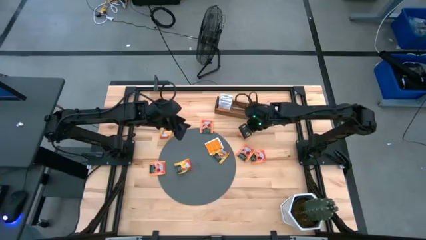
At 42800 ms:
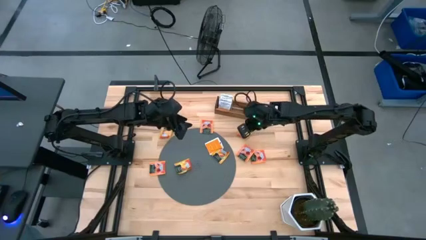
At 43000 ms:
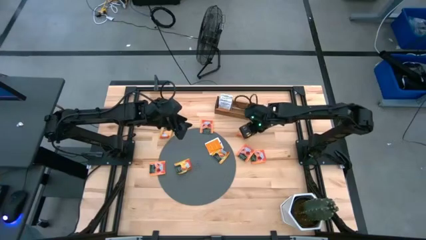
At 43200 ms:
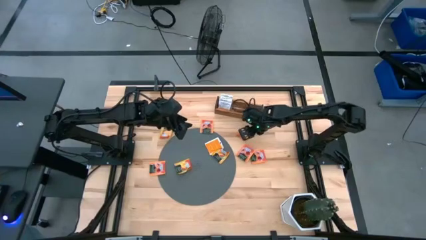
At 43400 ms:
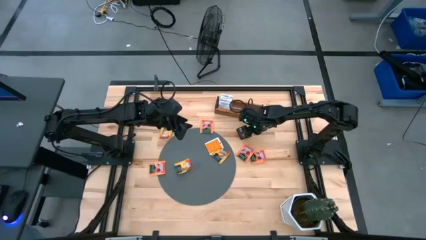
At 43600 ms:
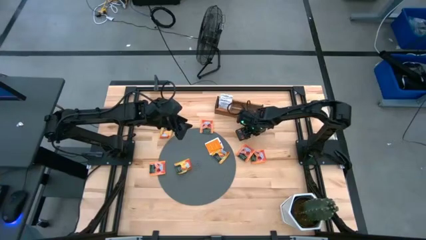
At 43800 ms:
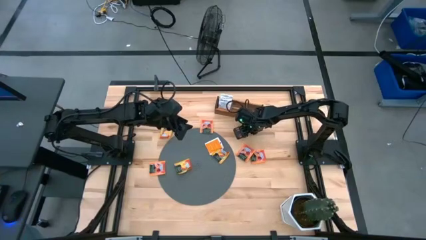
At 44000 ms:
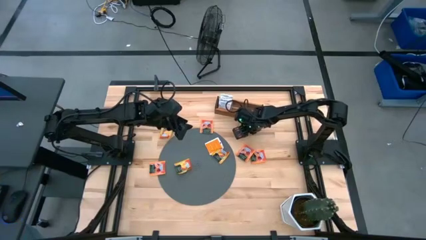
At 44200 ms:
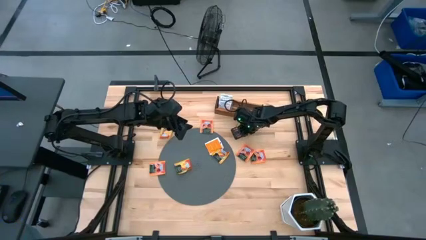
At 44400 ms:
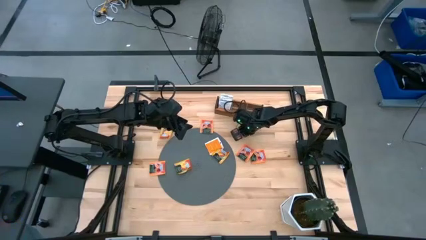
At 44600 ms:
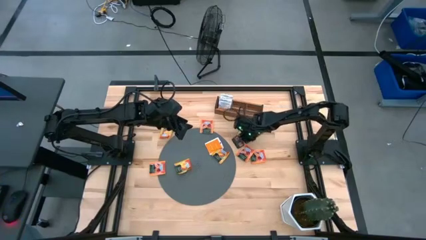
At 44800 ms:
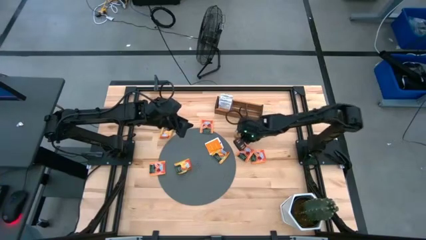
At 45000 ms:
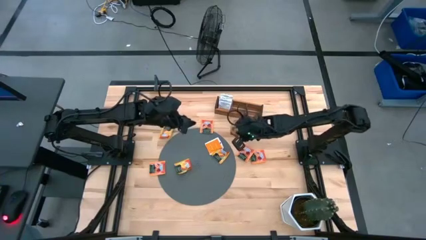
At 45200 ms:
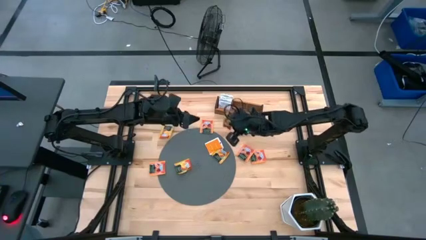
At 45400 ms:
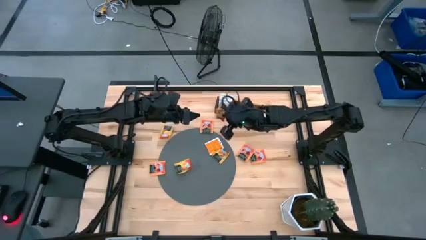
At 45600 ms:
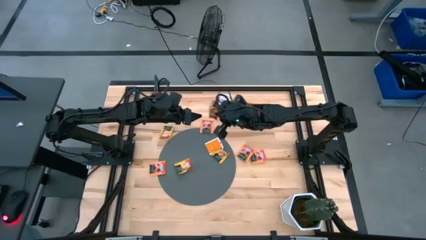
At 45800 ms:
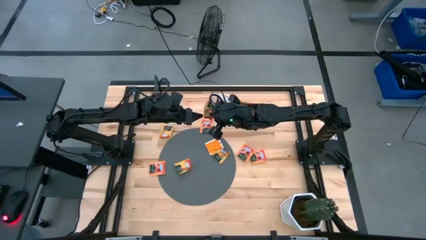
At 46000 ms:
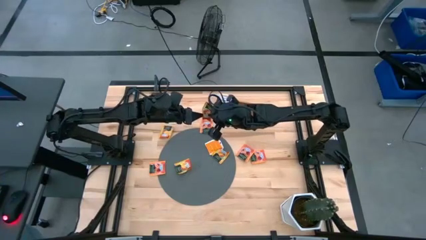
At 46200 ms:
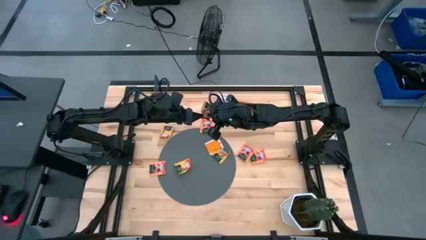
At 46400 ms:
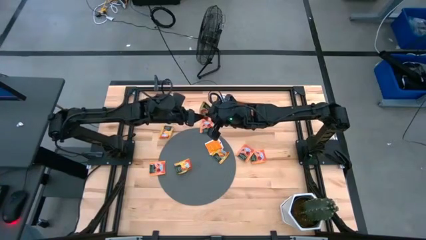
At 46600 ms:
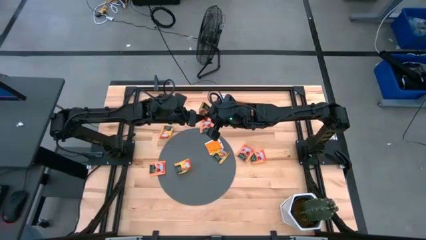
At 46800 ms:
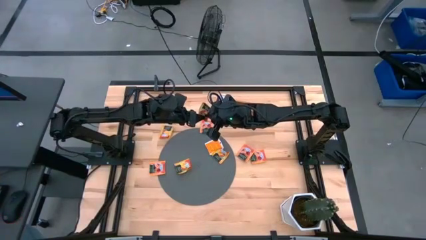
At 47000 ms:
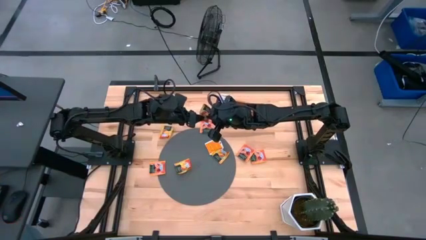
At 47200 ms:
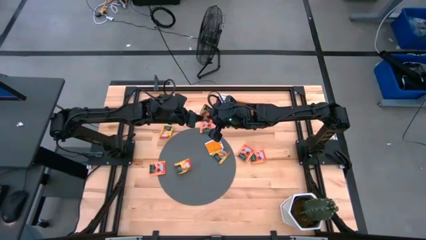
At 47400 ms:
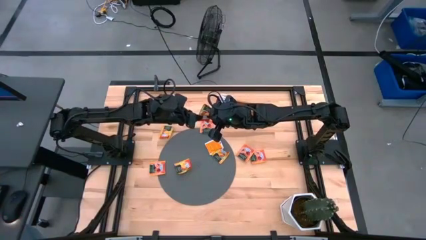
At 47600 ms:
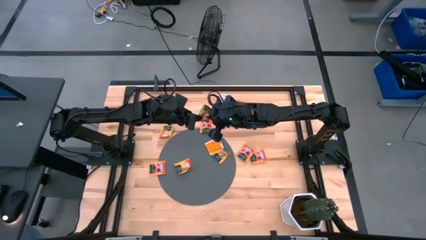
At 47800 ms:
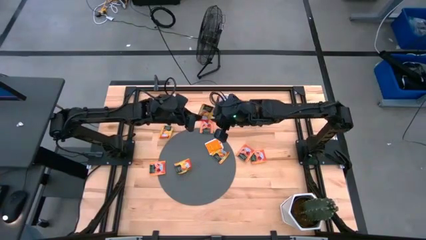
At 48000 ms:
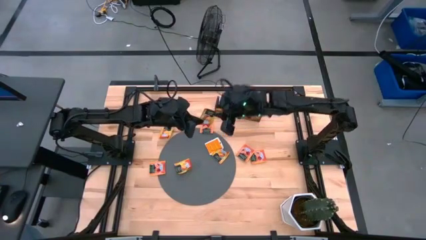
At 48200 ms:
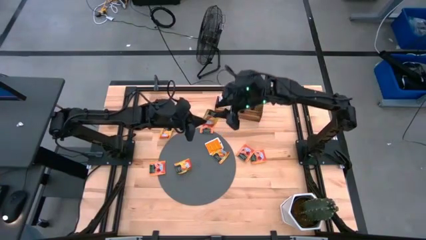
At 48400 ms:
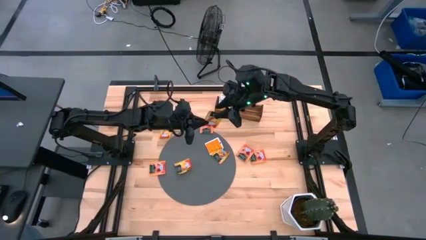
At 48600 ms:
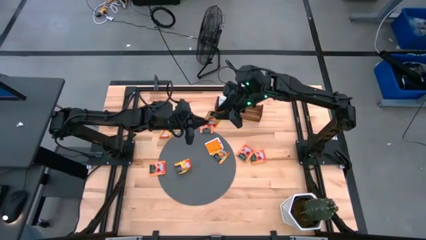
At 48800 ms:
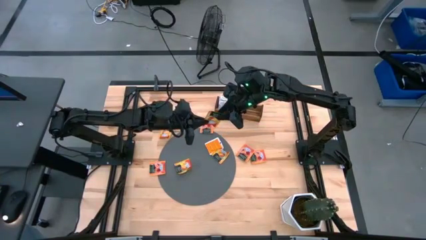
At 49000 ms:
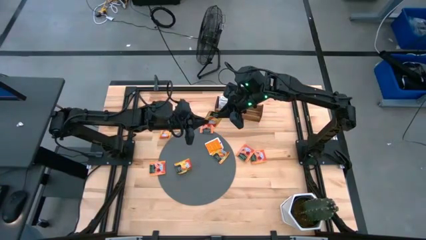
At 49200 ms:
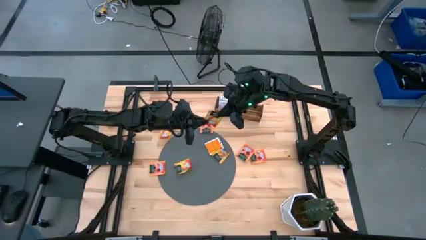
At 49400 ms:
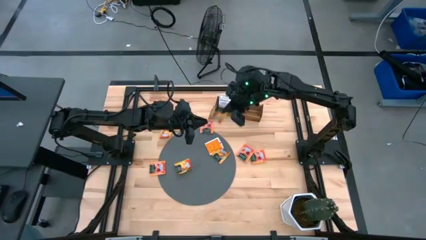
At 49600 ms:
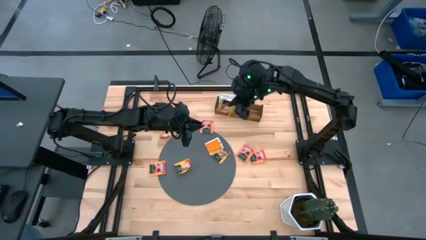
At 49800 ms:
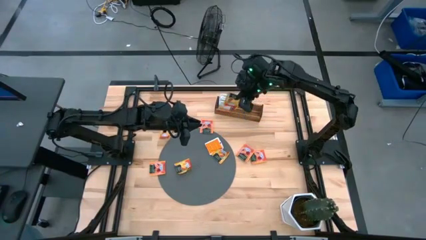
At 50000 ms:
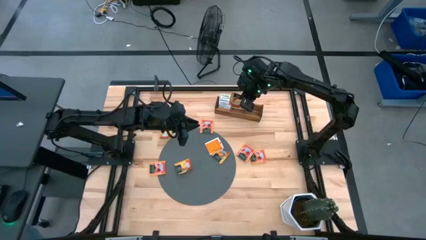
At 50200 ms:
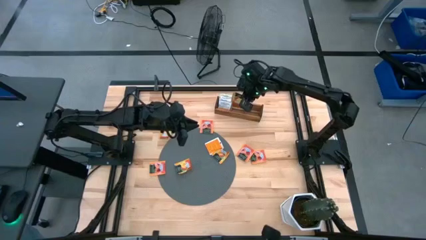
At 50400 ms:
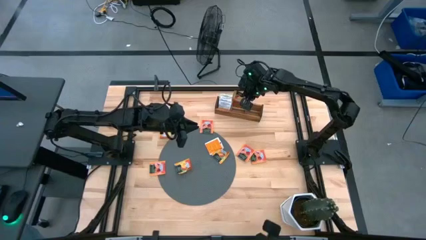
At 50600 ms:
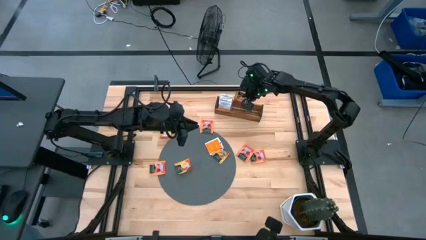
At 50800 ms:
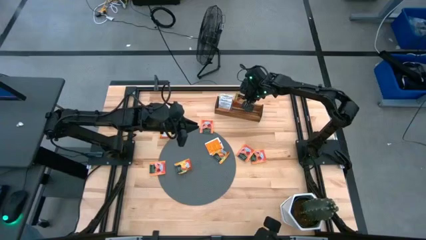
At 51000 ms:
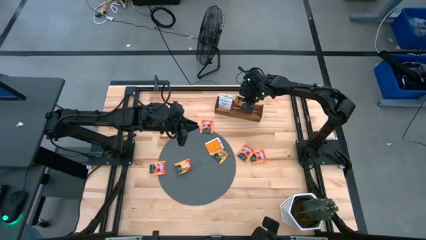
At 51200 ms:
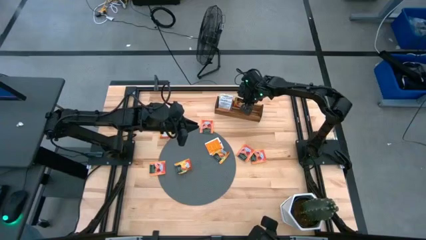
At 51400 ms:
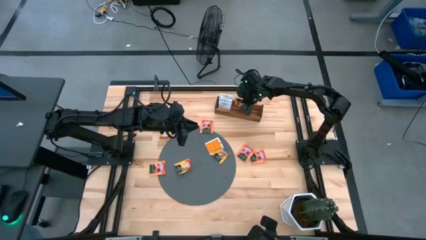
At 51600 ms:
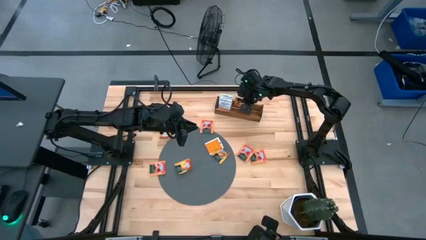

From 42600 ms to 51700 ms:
Task: Pick & Place Tea
Put the yellow tea bag into the middle section of the wooden organizer

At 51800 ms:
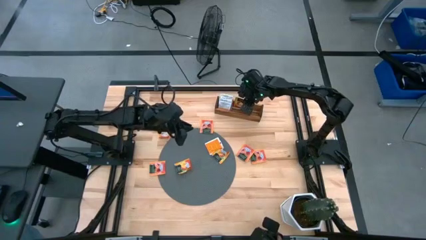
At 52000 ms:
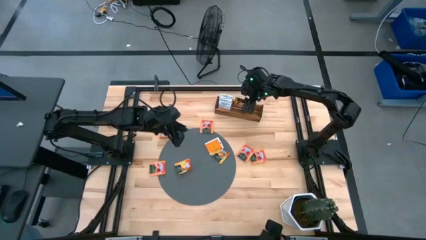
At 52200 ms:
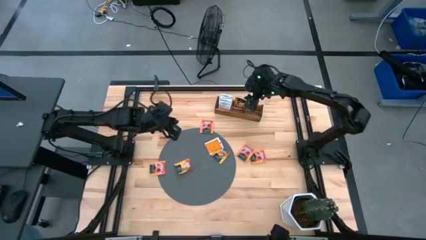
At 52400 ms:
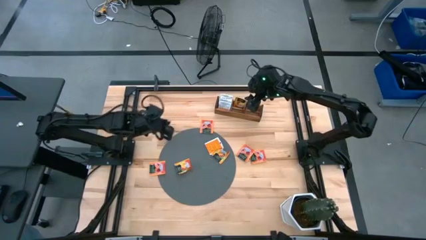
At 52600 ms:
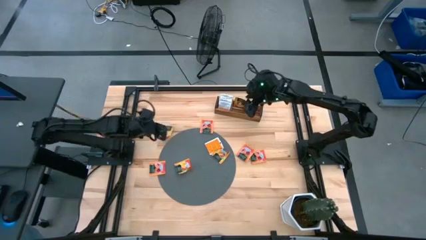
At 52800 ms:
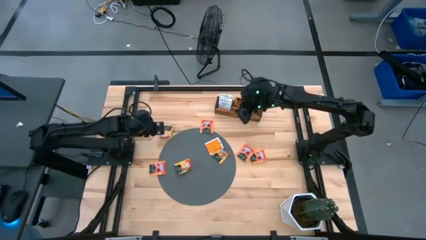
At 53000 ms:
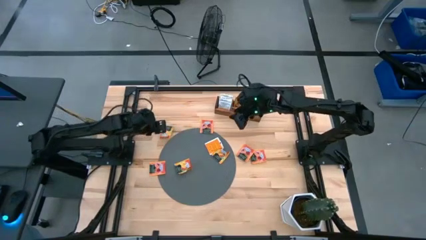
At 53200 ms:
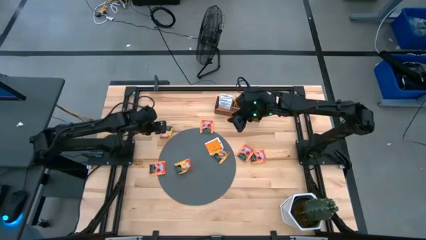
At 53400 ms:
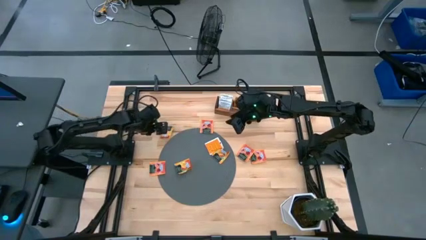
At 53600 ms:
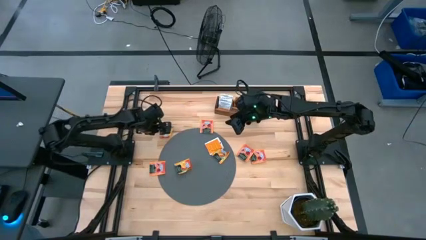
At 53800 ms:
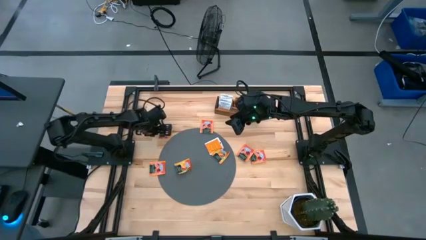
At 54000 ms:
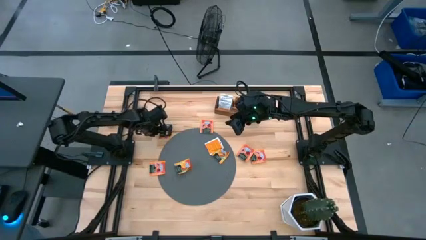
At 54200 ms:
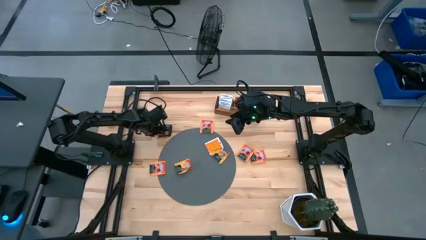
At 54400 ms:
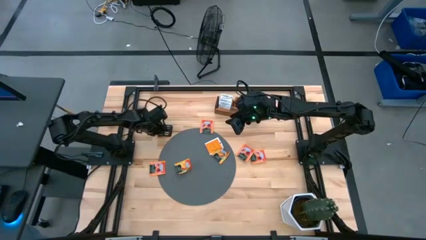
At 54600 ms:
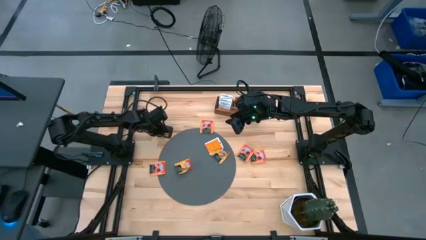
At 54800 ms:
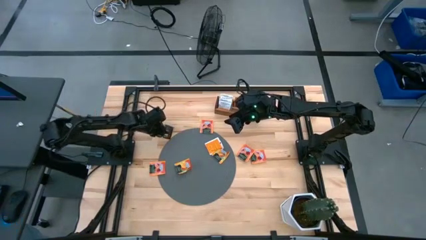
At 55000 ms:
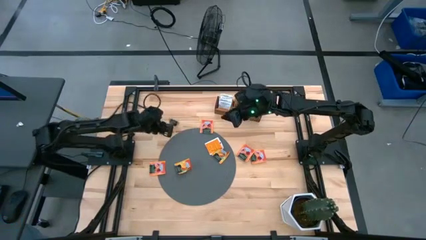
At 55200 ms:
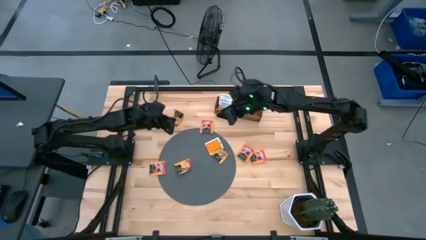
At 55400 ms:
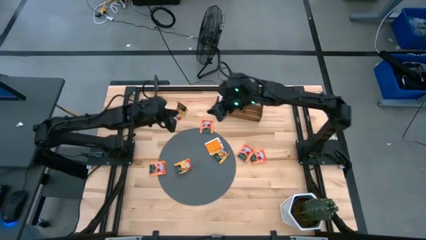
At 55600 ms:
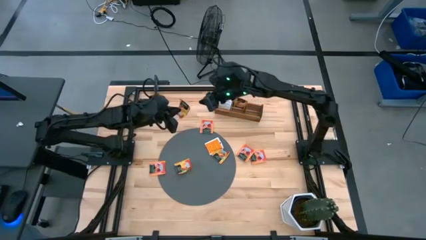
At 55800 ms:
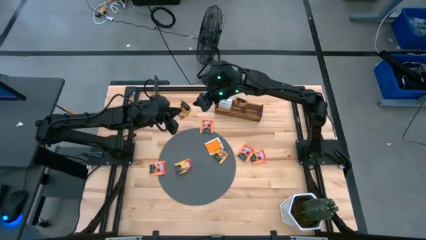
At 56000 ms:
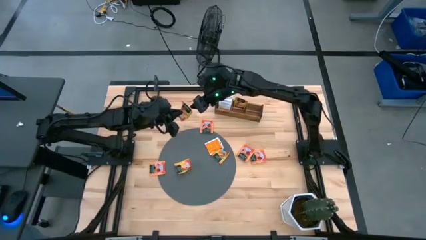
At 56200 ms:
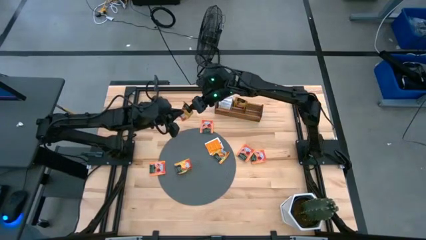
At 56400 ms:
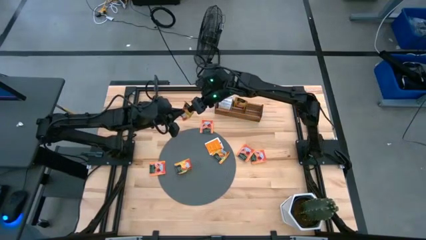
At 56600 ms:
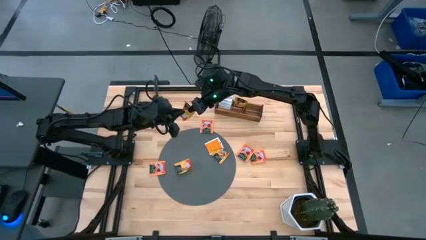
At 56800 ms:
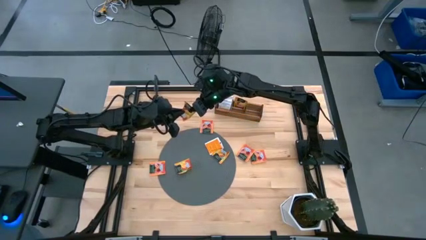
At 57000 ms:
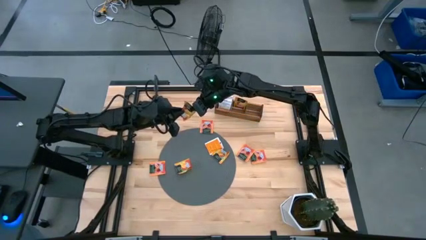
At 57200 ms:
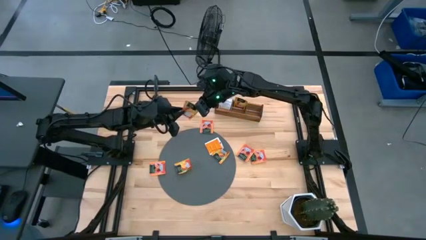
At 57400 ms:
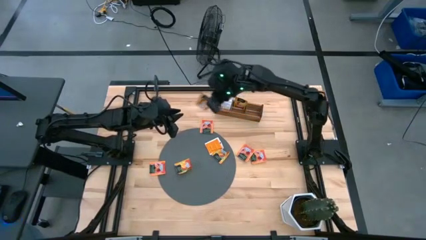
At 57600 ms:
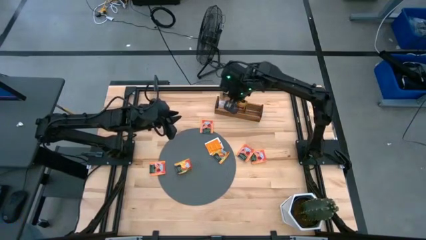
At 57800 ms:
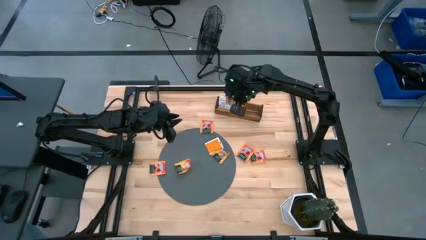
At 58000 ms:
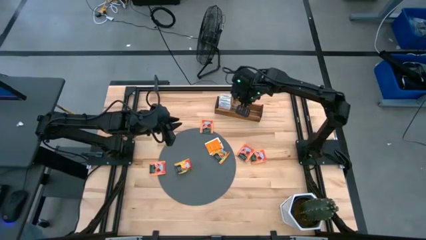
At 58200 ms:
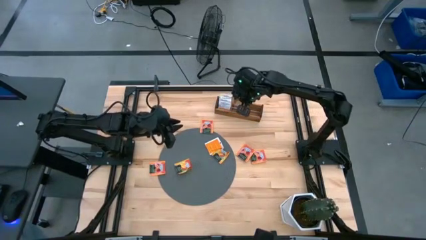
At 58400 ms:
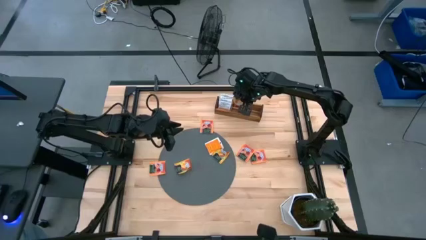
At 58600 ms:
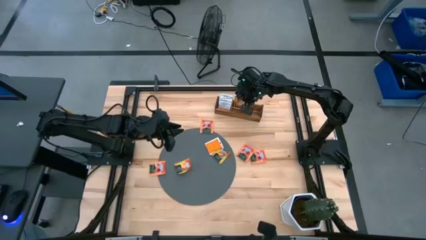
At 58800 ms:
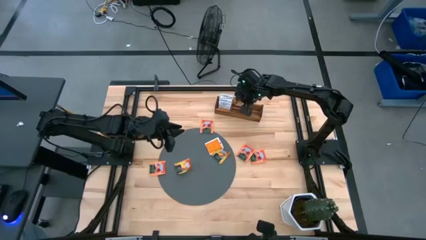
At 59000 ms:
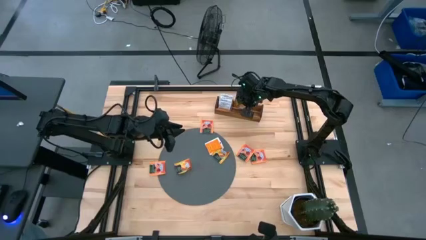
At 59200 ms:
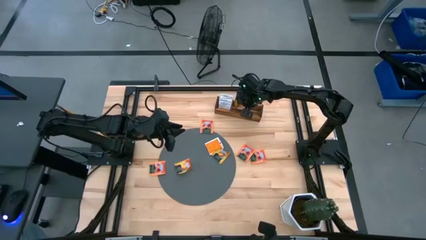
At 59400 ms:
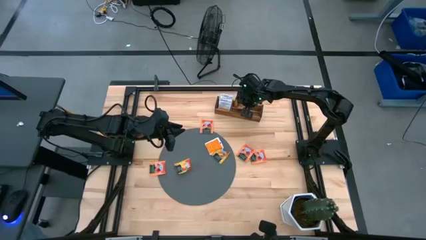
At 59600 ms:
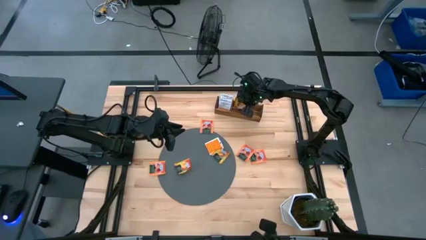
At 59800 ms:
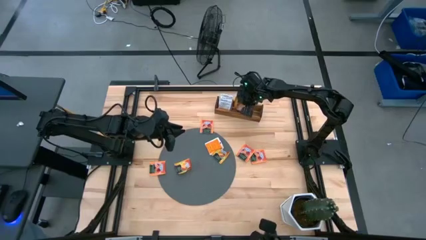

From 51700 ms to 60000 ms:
Put the yellow tea bag into the middle section of the wooden organizer
